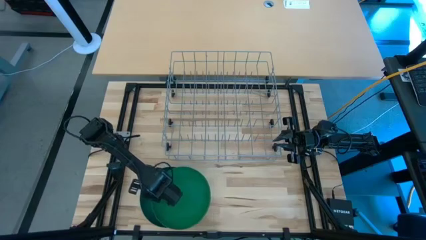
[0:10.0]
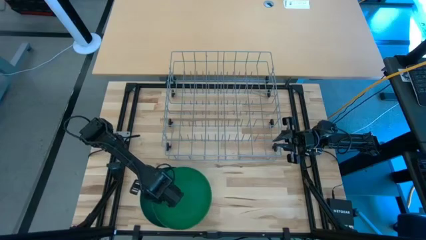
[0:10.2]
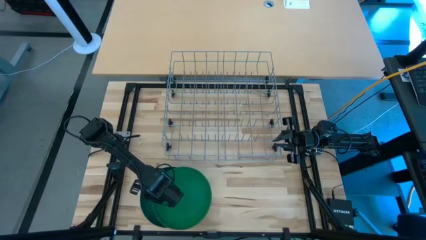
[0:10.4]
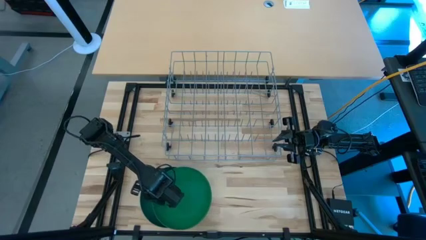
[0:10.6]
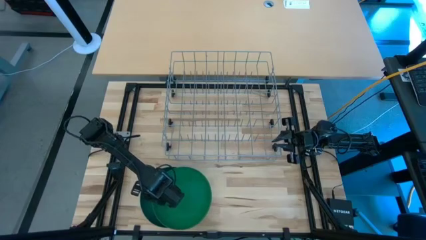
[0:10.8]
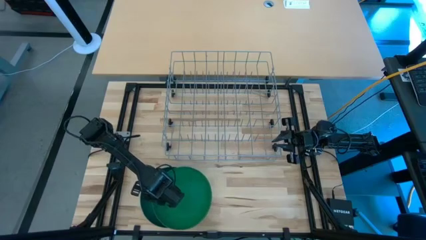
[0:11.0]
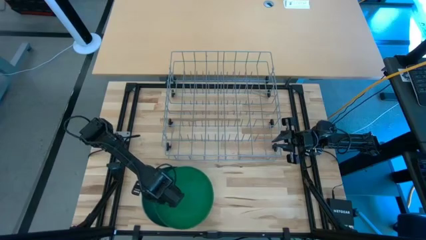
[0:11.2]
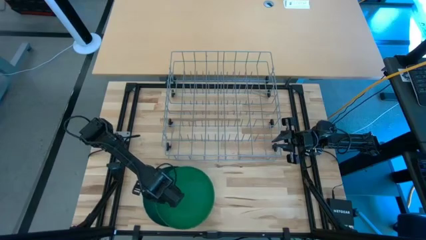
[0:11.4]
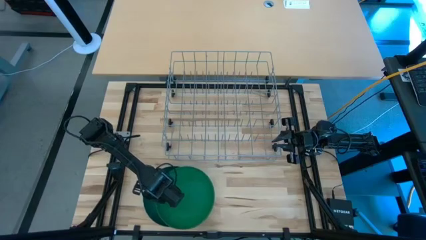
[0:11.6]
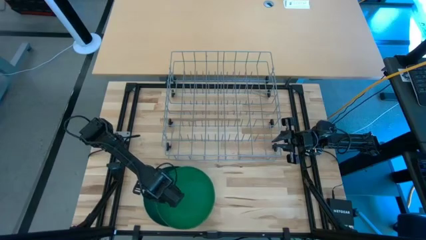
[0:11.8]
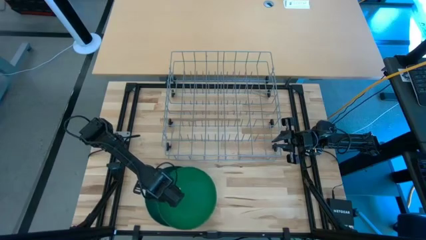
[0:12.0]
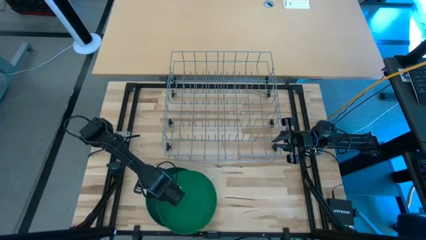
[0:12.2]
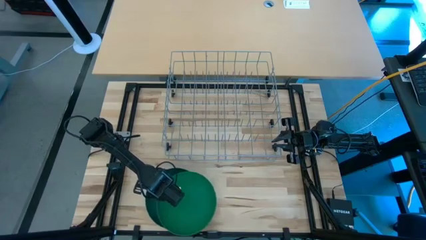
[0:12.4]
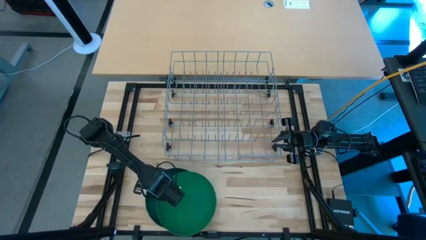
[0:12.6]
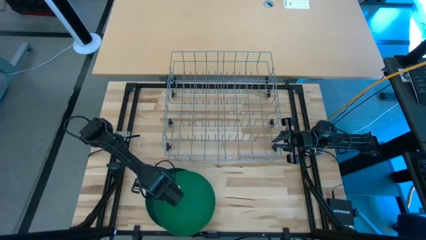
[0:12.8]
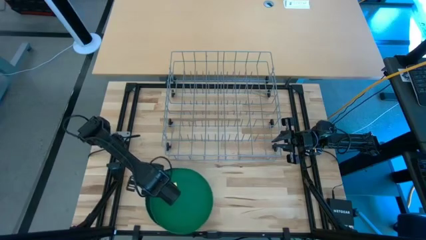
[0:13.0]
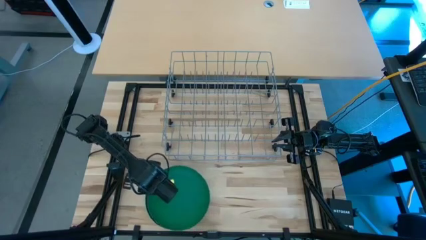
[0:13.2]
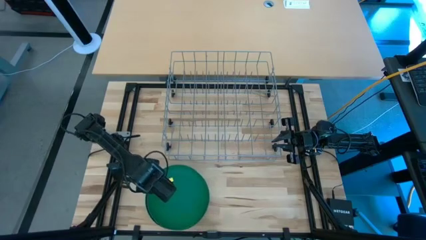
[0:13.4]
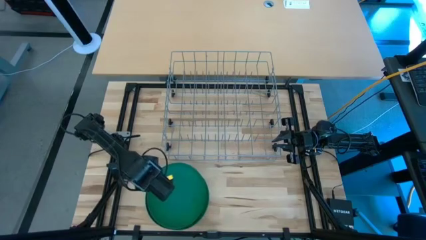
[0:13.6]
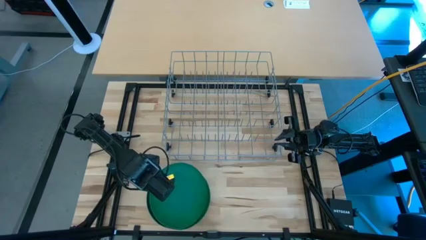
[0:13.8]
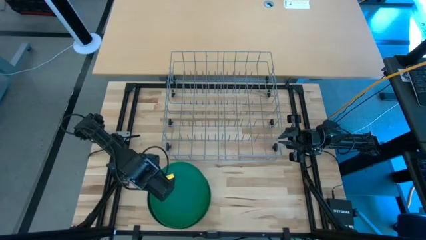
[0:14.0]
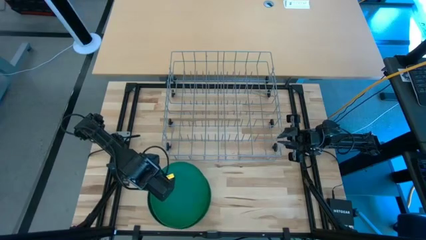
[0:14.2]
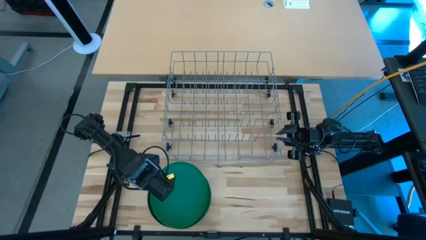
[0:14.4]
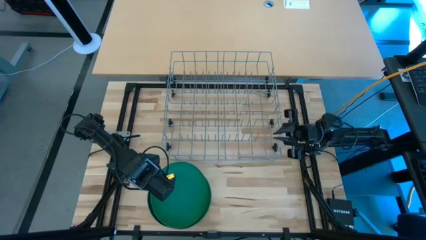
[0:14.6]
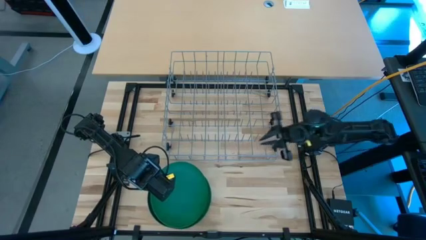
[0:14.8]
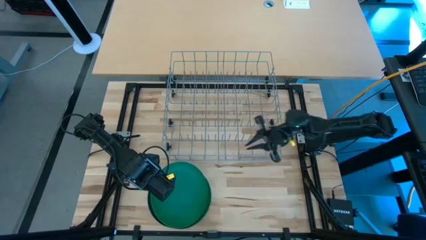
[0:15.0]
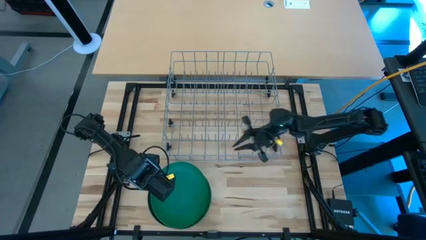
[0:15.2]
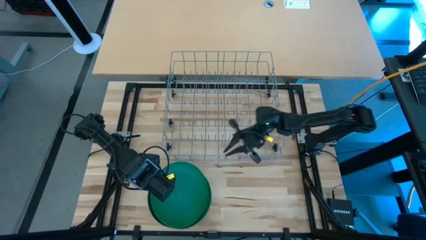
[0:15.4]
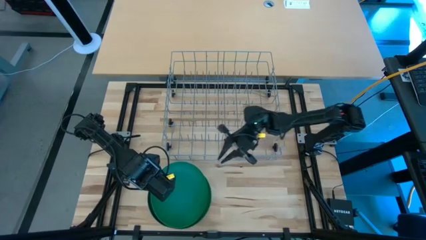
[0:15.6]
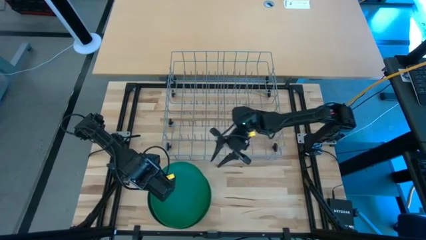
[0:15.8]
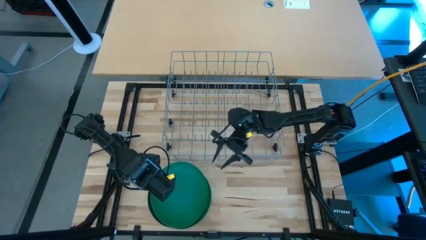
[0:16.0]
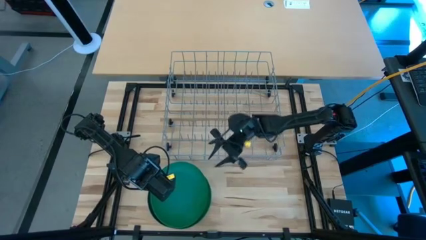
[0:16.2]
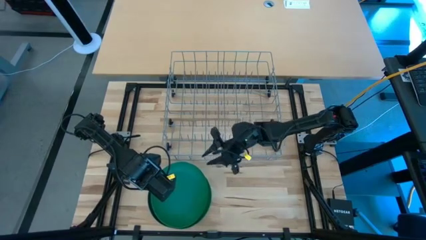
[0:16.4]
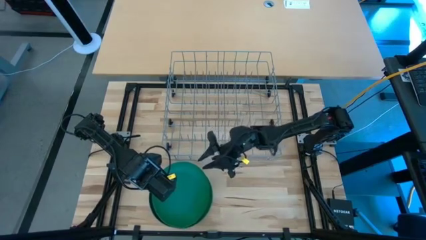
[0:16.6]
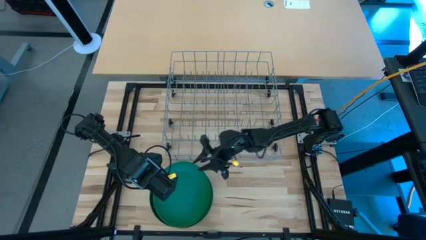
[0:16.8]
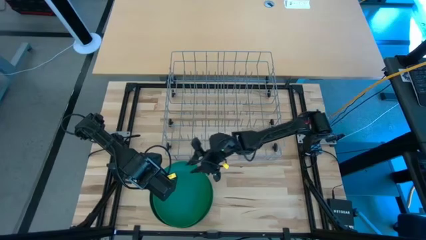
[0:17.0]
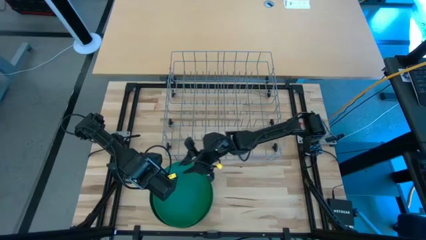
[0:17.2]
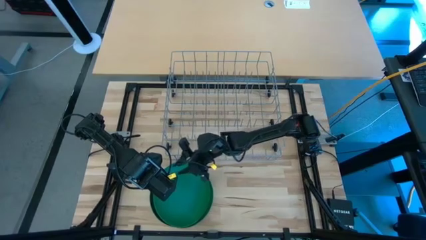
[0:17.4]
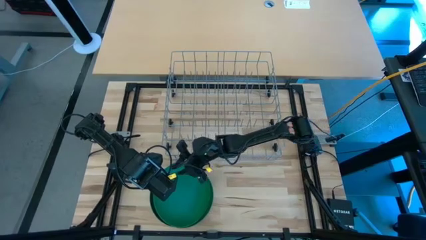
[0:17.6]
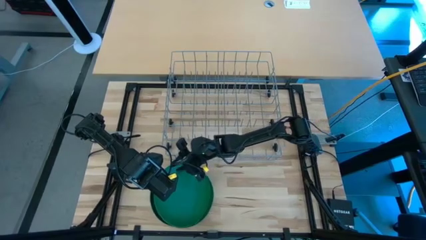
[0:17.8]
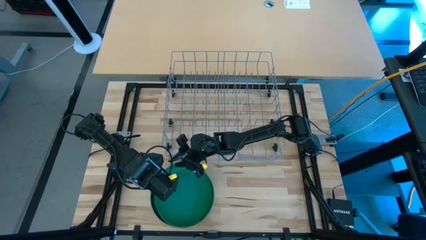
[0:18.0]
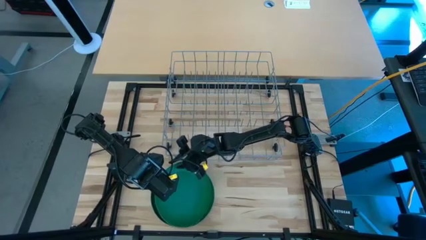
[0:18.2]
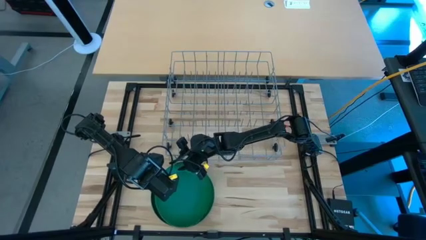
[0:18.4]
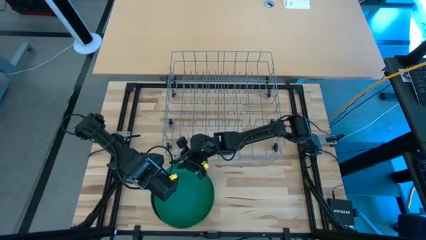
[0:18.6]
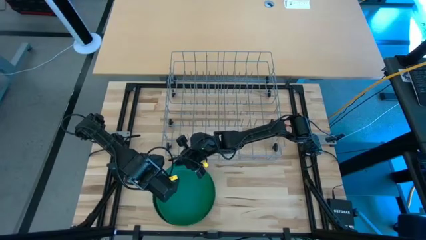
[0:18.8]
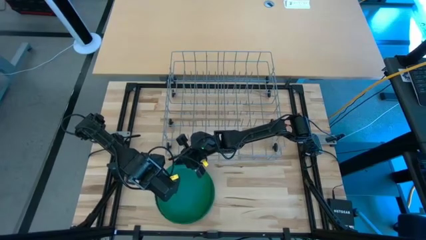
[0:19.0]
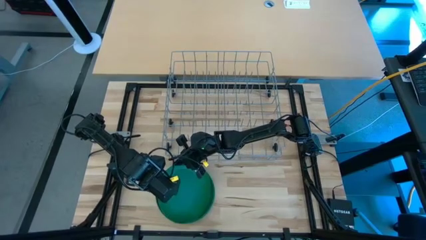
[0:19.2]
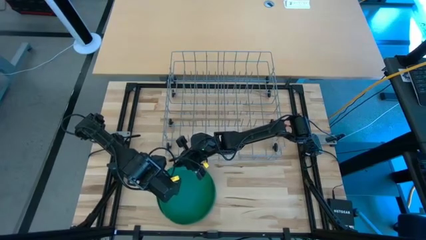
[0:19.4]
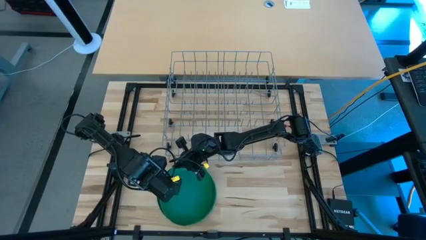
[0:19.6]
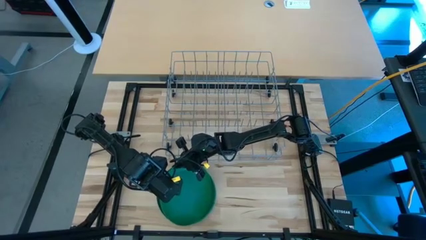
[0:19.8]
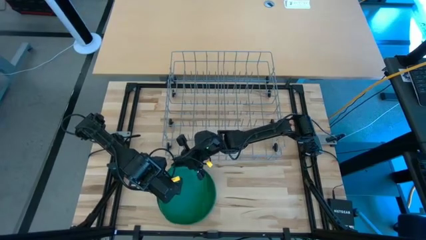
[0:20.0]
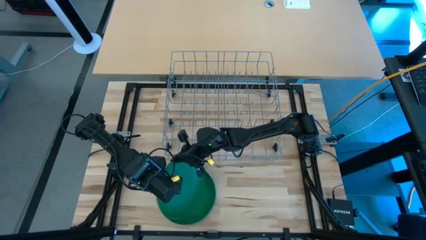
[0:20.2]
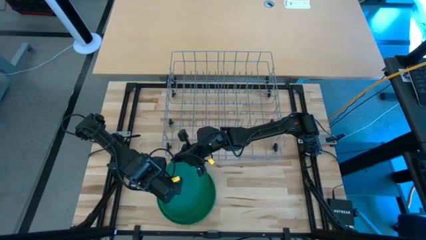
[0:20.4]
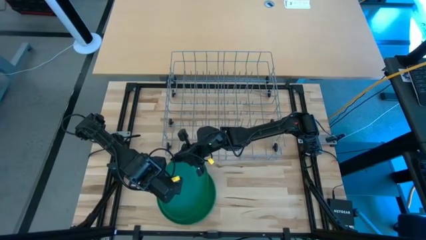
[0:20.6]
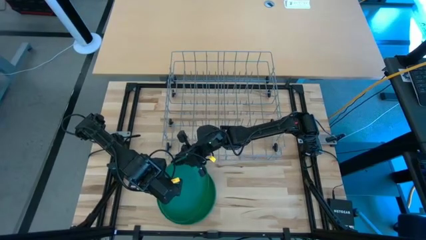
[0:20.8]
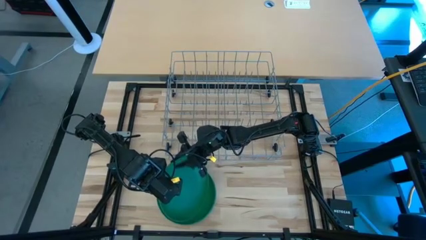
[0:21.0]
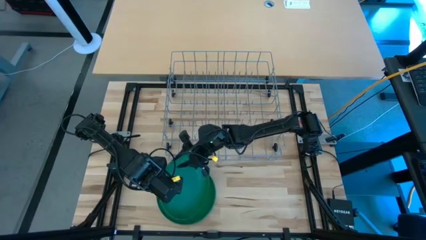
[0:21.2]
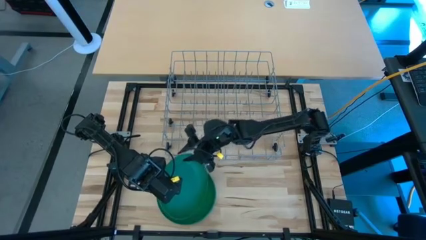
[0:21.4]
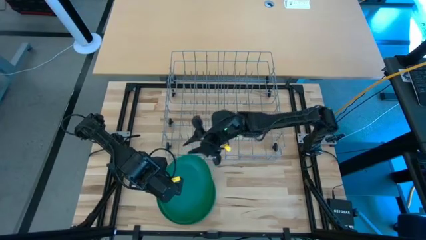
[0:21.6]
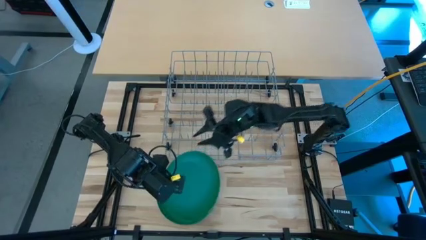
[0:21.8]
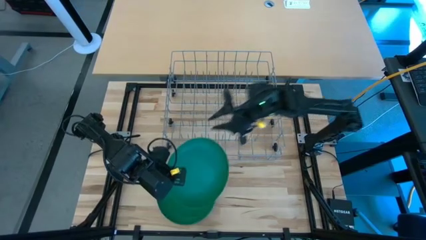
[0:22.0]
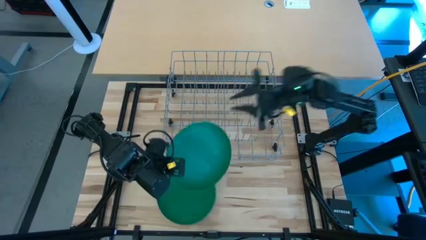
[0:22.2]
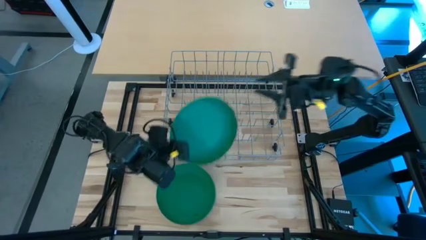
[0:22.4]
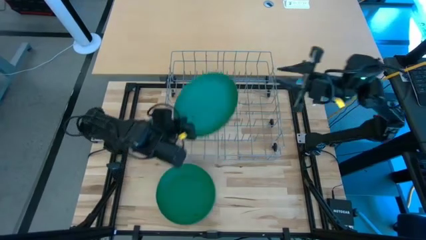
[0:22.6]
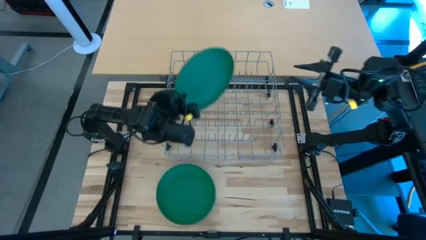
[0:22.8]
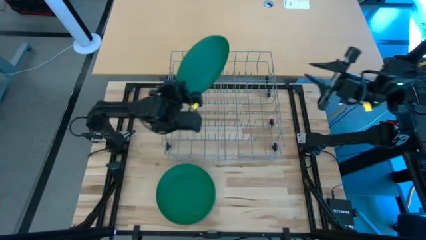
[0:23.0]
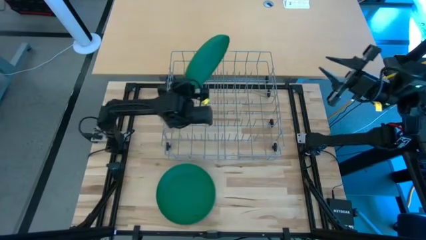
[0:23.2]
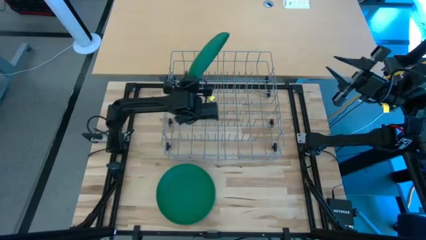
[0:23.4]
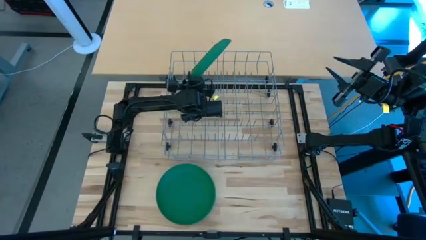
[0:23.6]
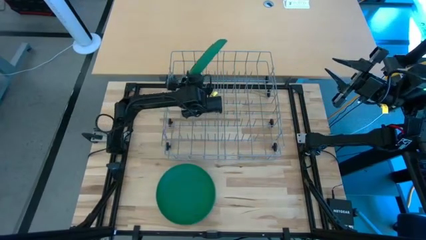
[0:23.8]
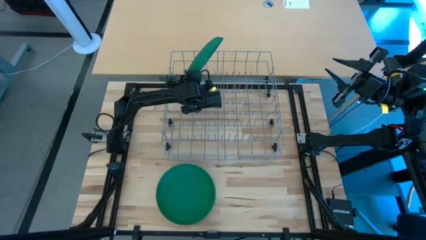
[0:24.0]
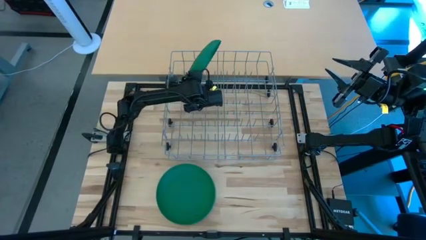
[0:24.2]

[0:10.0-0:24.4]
Task: Sort dishes
Put the top green plate into the dish rack
